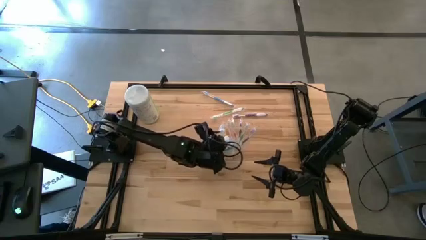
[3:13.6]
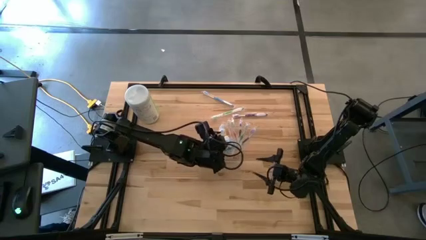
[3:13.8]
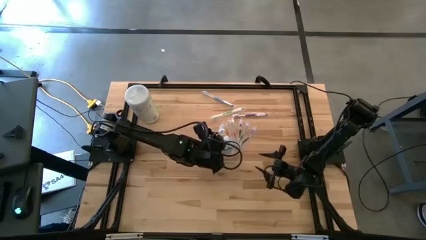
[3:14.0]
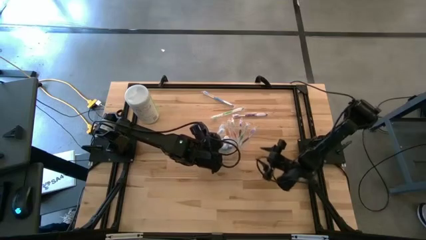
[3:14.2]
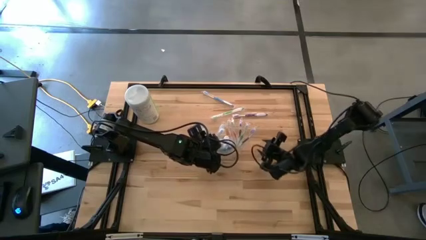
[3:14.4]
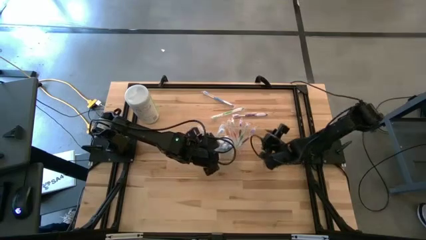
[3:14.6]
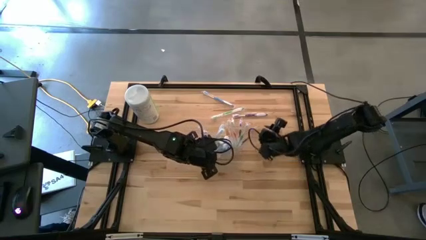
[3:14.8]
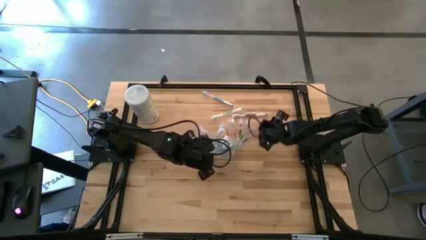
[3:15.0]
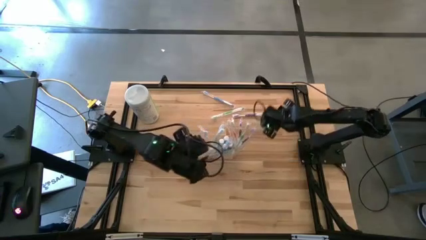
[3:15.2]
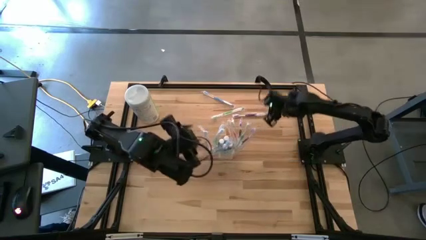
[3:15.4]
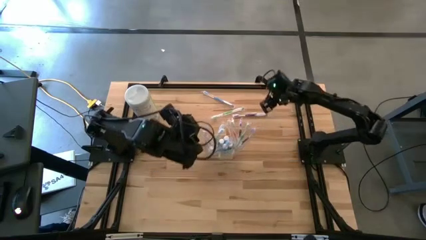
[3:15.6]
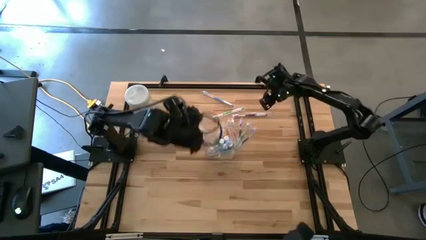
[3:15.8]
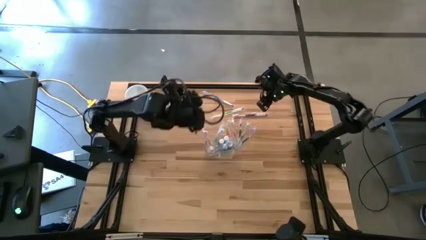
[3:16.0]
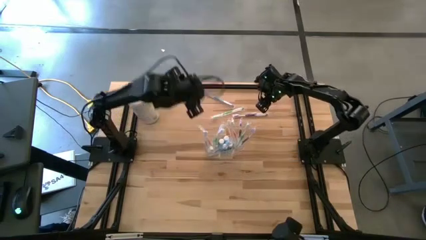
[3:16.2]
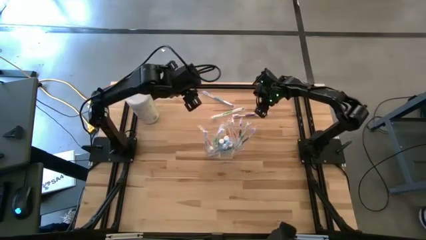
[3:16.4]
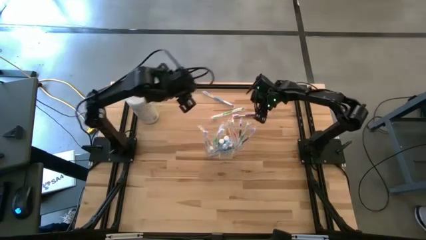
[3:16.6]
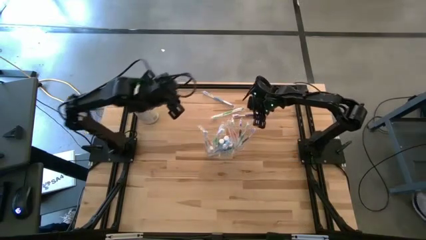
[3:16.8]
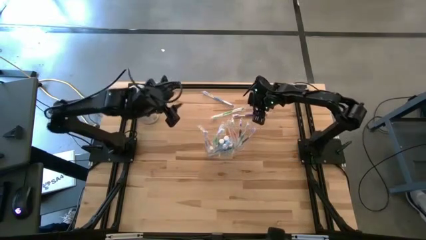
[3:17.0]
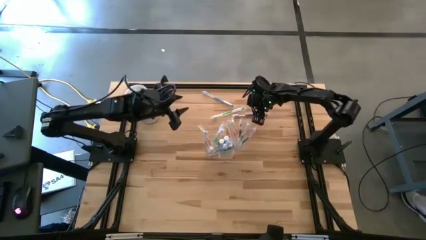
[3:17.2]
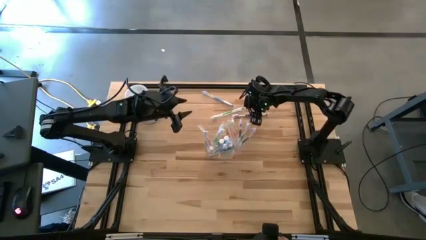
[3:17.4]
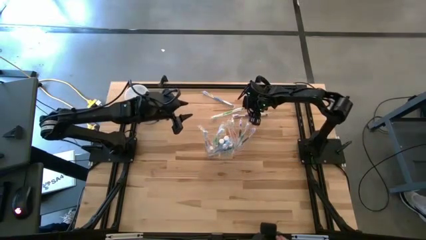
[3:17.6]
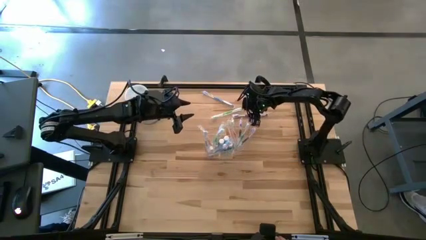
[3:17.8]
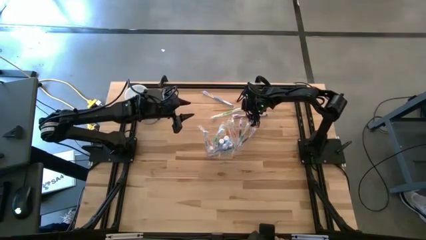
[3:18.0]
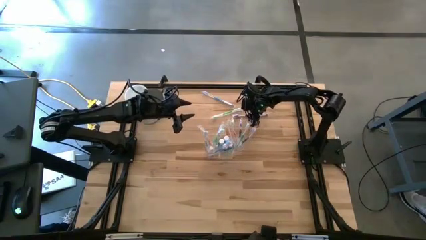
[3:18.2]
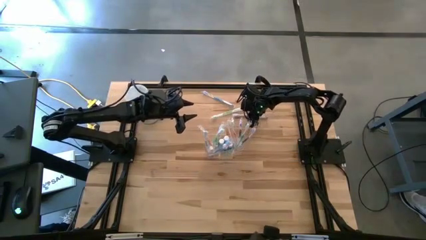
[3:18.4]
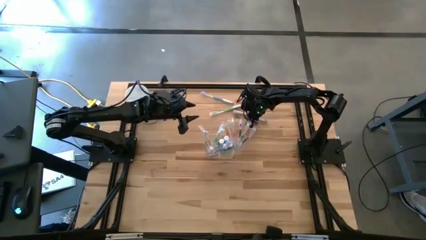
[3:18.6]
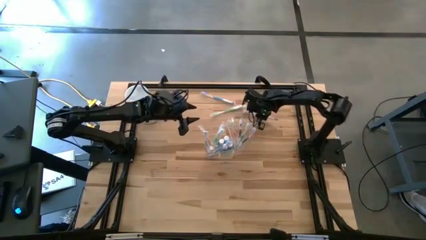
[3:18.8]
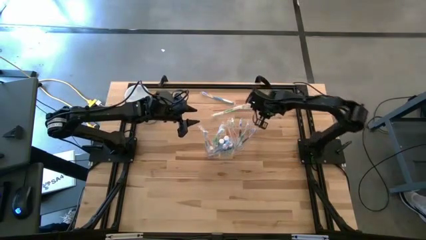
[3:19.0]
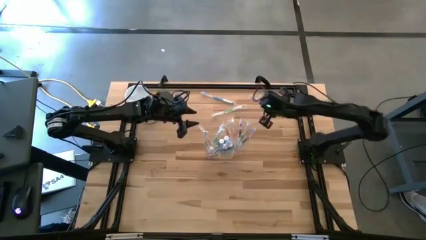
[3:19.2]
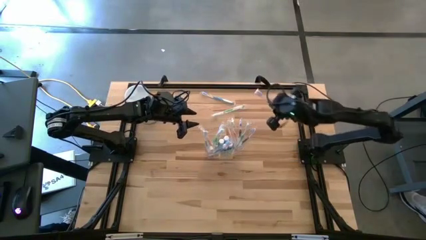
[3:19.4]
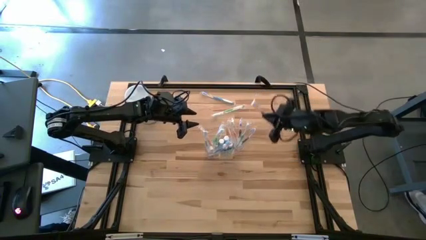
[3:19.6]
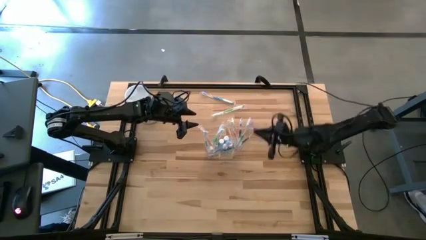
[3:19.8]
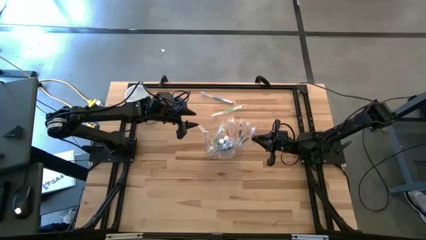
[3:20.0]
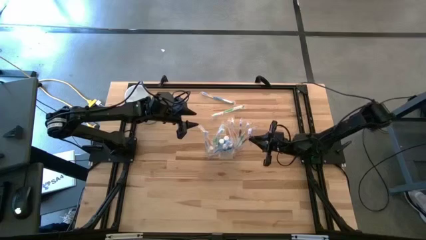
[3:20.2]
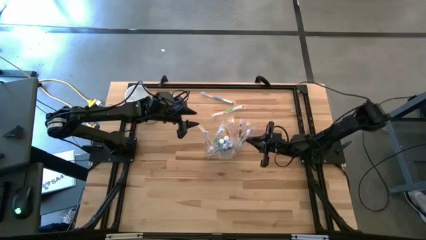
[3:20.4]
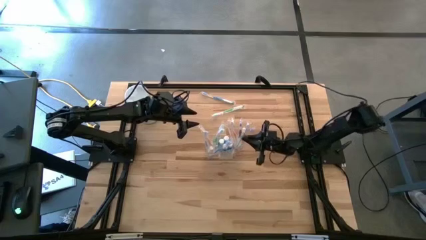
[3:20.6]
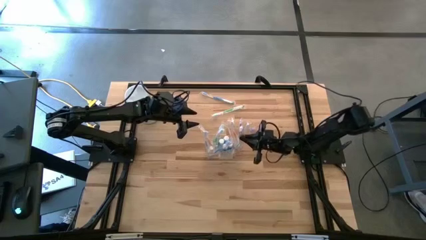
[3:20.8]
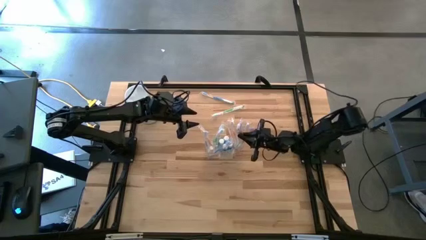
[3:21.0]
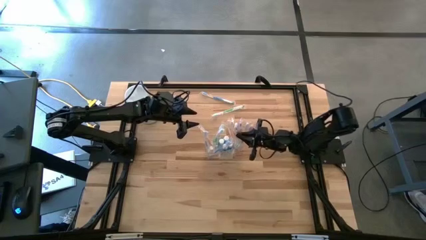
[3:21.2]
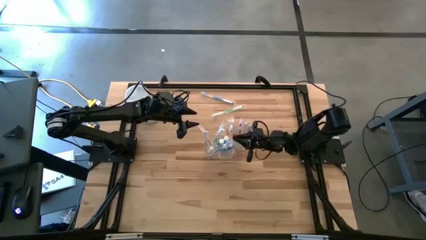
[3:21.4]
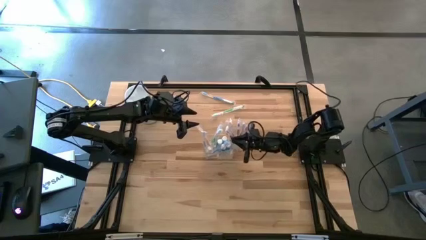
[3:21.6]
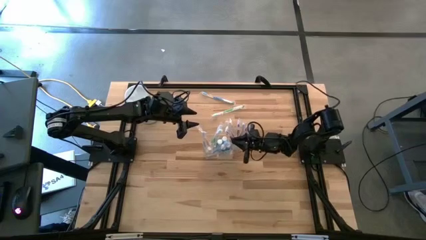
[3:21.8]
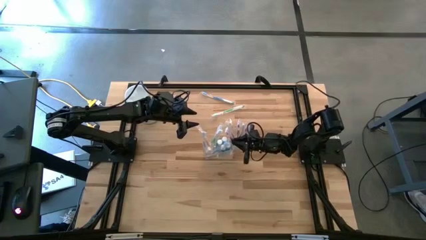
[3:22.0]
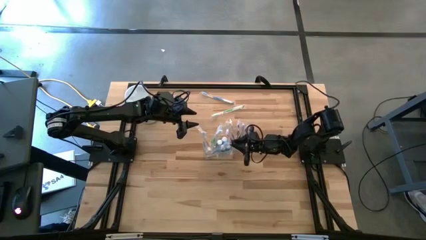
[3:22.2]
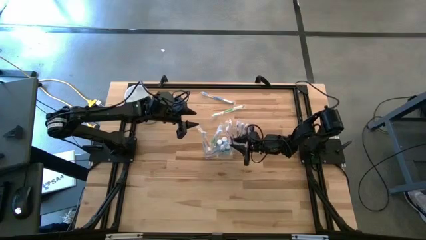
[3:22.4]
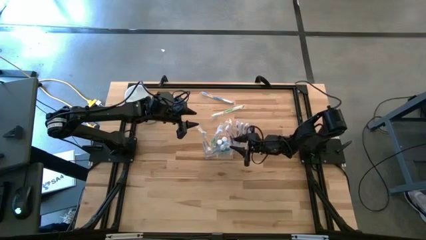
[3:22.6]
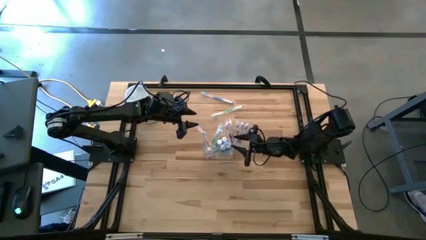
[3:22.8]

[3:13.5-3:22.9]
Task: Pick & Place toothbrushing station
Put the violet toothbrush into the transparent organizer

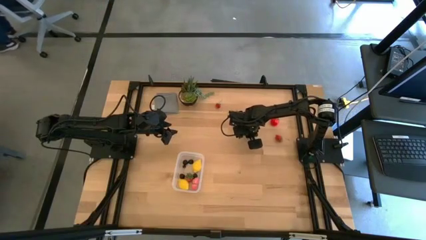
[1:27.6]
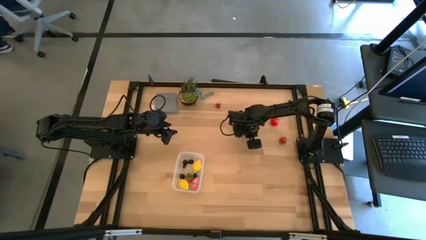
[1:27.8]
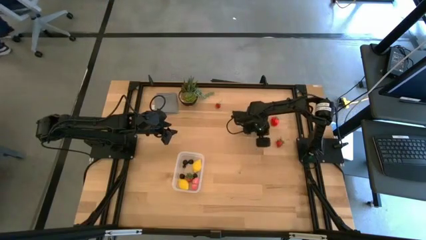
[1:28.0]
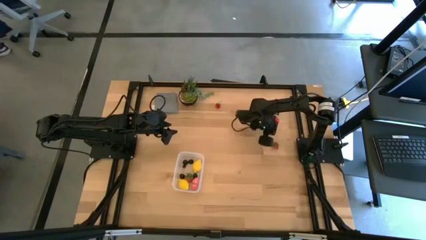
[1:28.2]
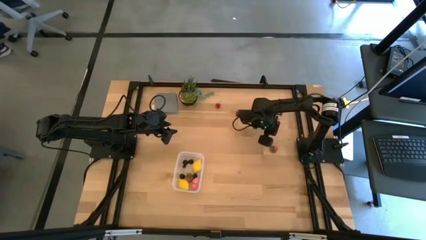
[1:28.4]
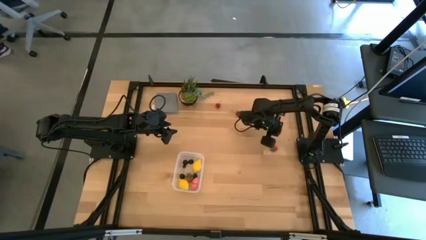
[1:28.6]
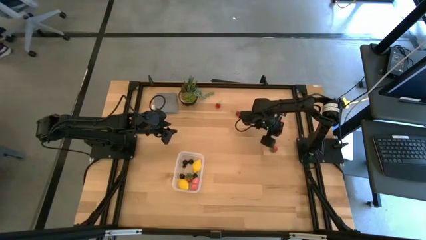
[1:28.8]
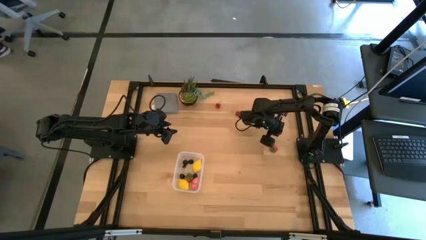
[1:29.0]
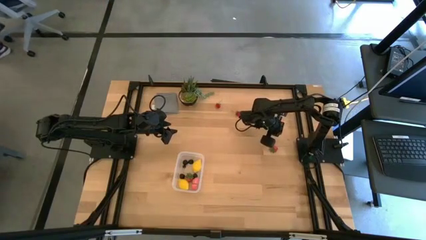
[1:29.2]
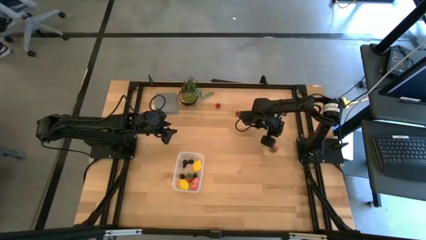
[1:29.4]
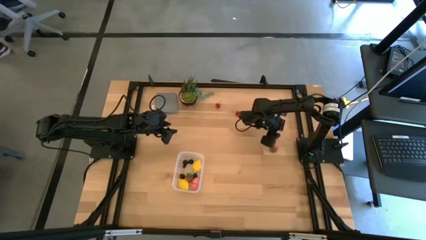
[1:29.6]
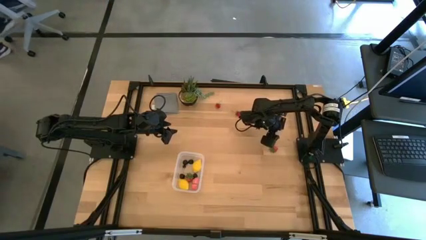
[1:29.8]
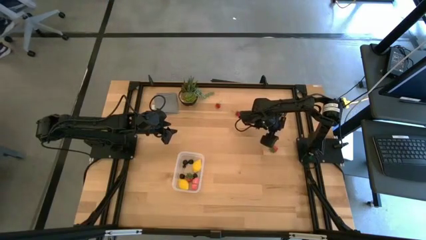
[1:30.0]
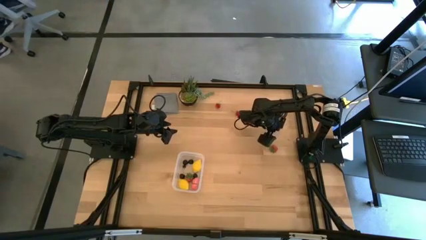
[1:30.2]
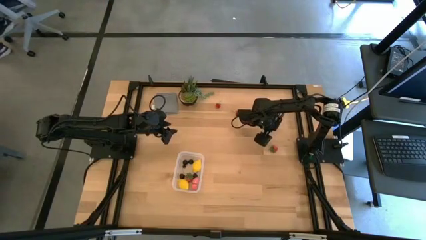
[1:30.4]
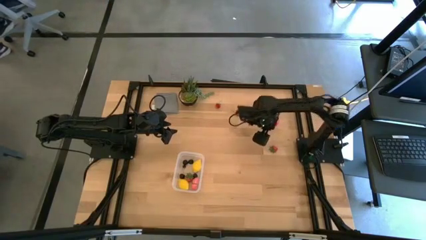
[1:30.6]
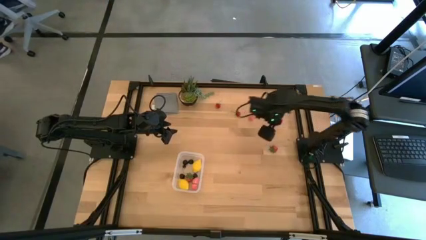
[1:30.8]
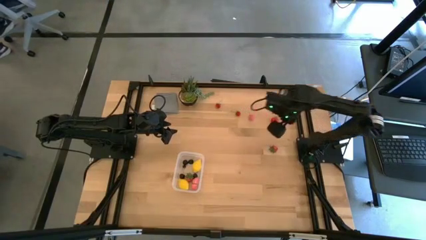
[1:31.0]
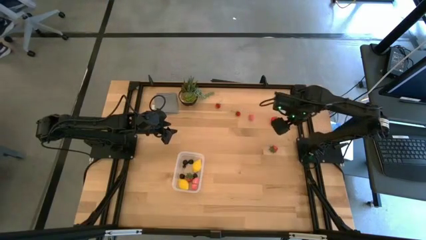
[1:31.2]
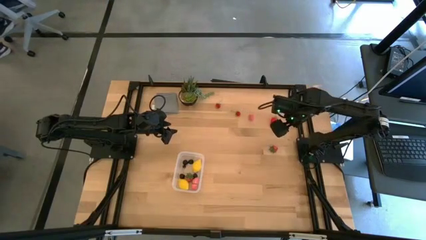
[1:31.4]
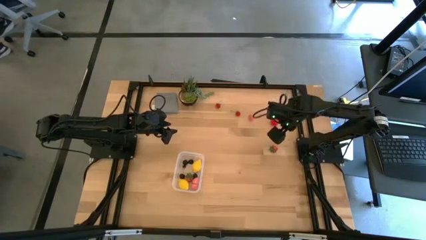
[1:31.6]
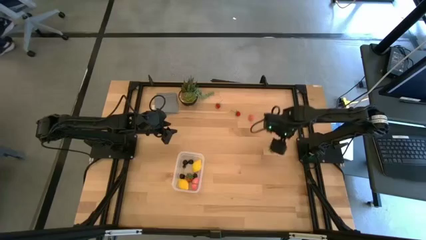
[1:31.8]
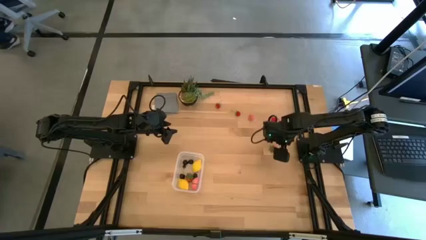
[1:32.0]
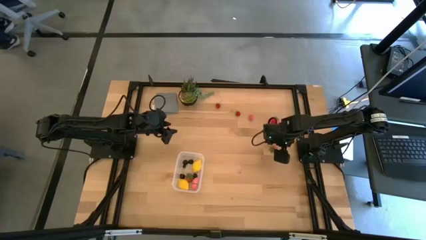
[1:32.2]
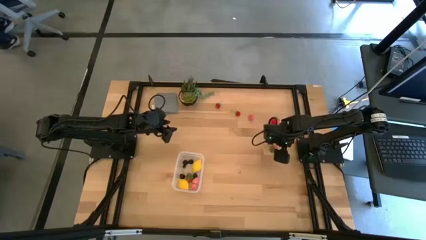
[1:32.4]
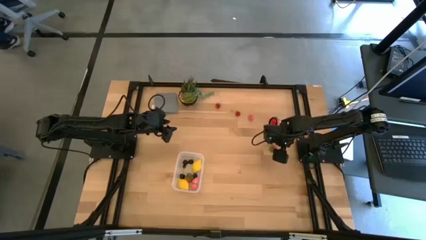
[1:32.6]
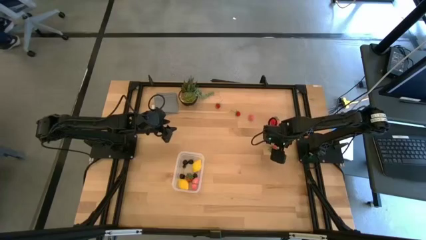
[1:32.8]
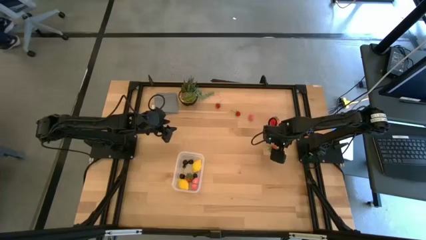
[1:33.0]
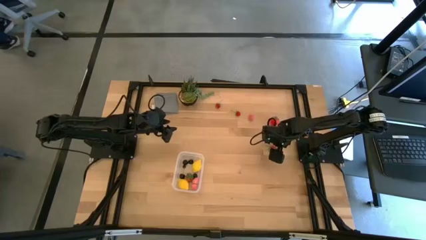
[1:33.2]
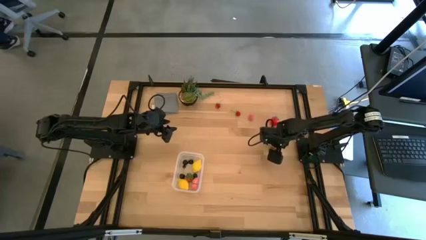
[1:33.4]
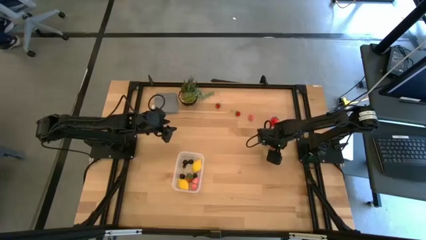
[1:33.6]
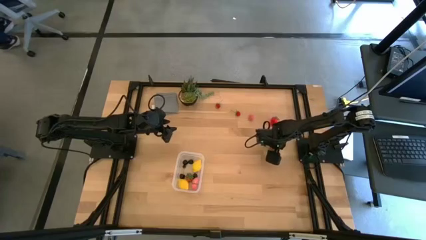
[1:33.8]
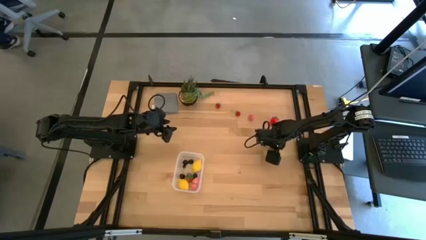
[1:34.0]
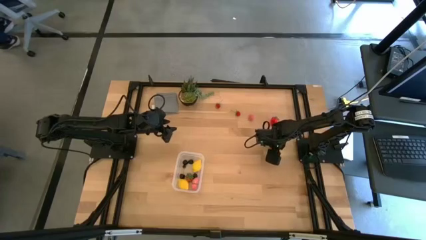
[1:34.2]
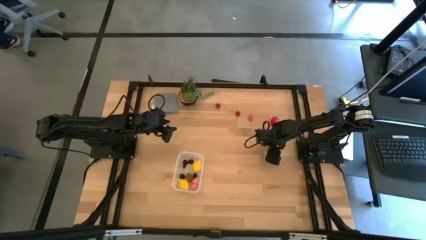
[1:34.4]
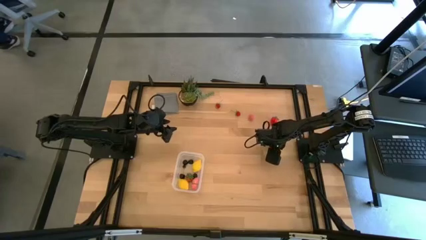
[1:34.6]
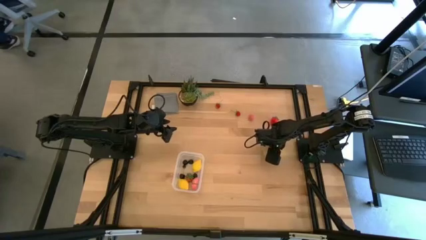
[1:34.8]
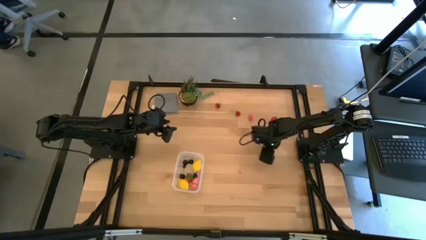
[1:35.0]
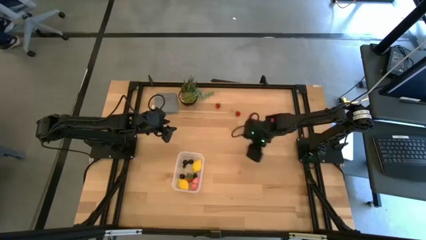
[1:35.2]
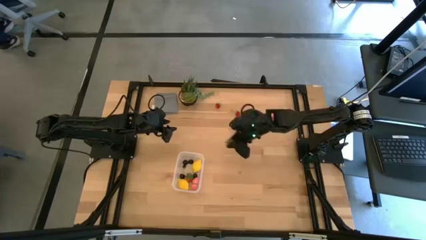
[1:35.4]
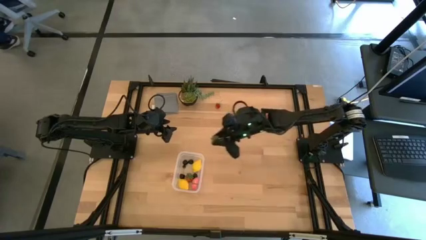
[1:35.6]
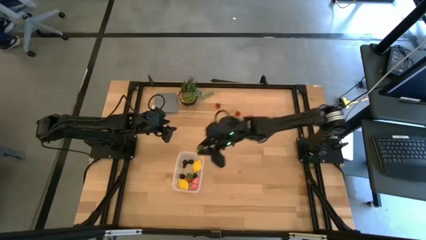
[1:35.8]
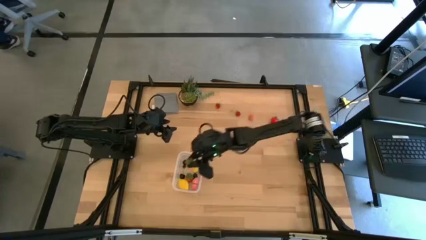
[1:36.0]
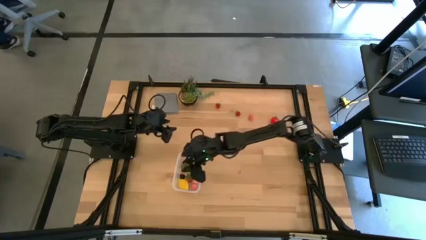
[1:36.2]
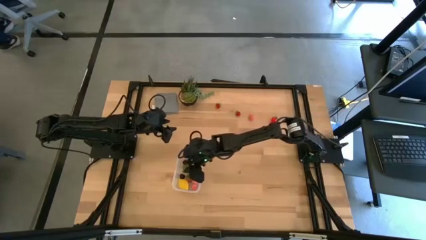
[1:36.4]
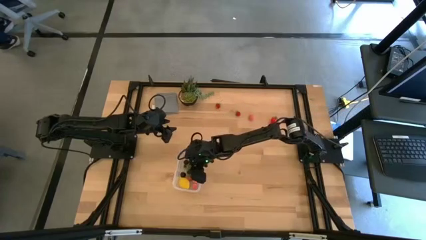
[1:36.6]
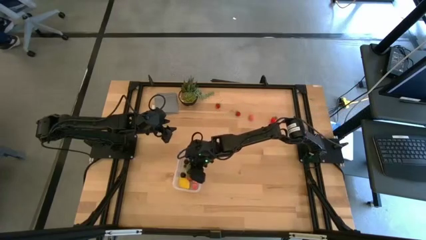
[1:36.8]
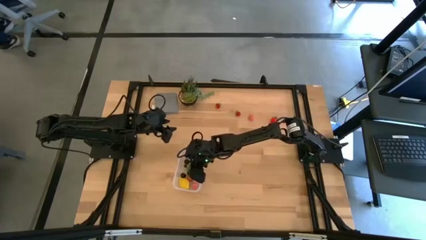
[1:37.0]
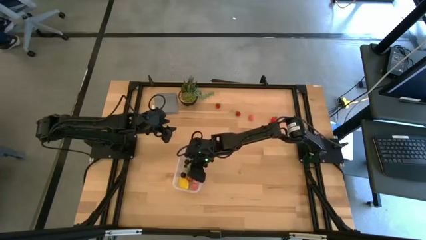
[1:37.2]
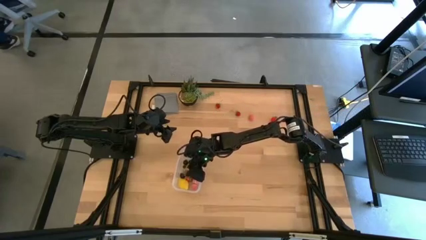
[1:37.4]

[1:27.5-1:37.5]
Task: Pick and placing Produce into tupperware
Put the red strawberry into the transparent bin
